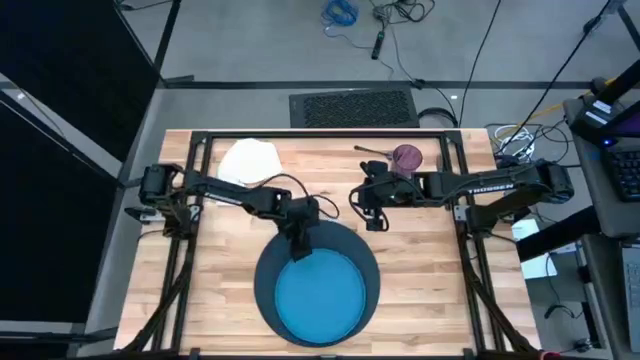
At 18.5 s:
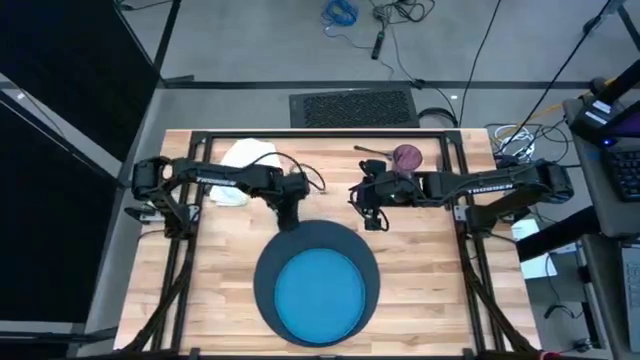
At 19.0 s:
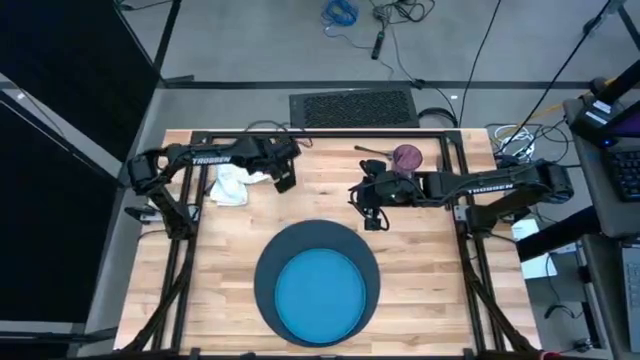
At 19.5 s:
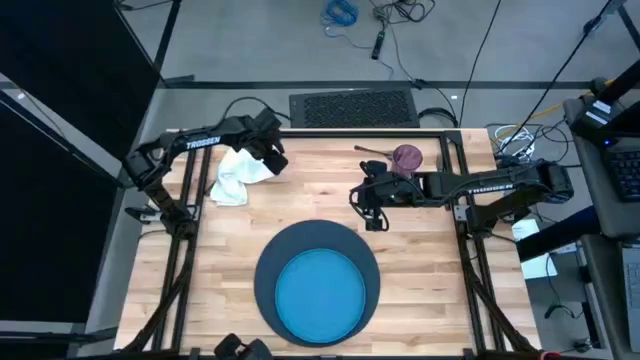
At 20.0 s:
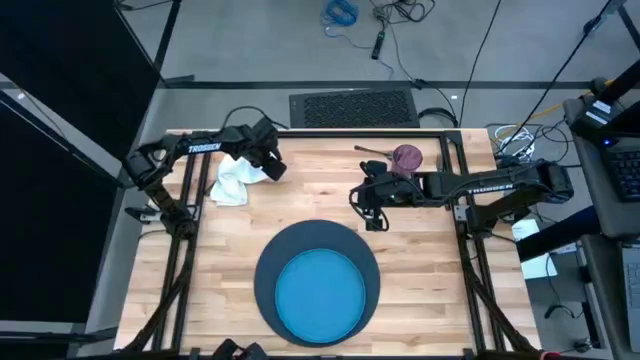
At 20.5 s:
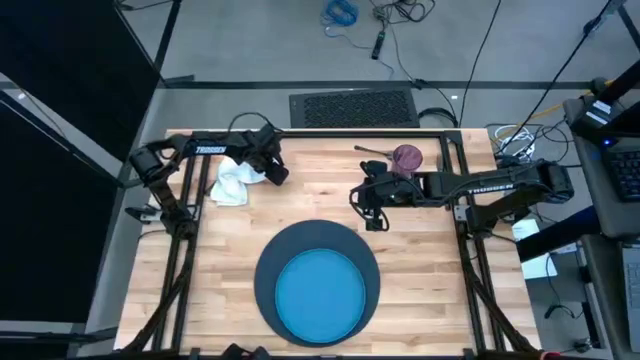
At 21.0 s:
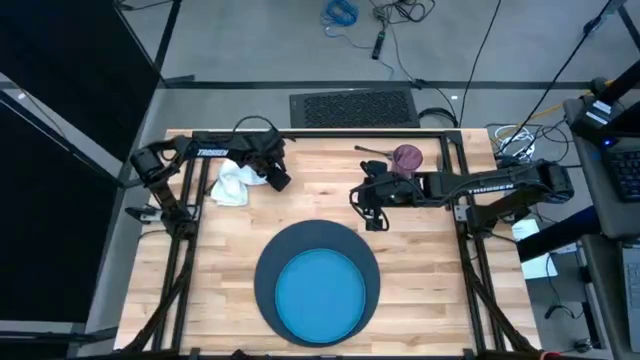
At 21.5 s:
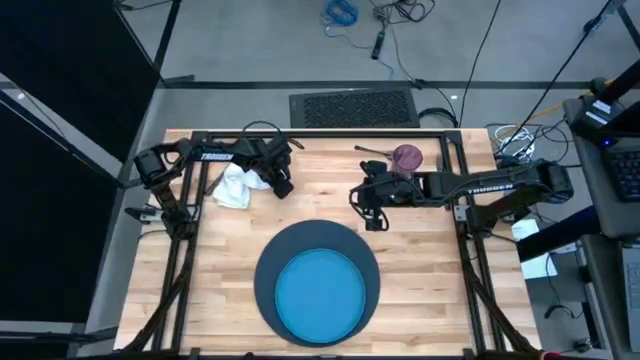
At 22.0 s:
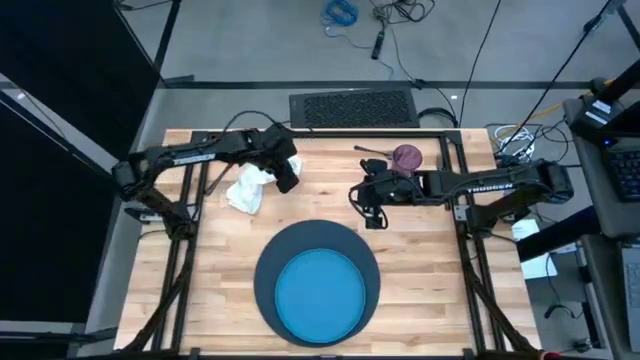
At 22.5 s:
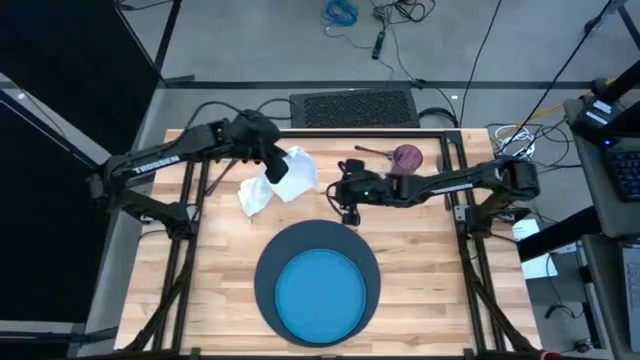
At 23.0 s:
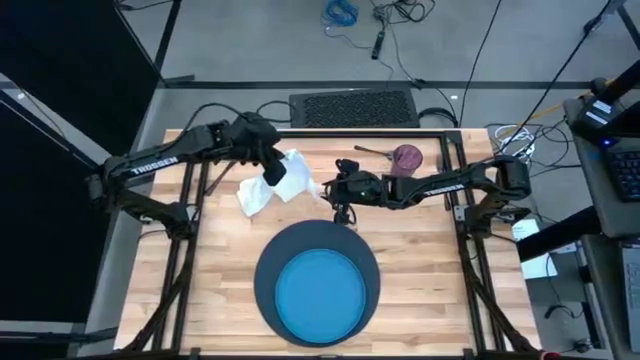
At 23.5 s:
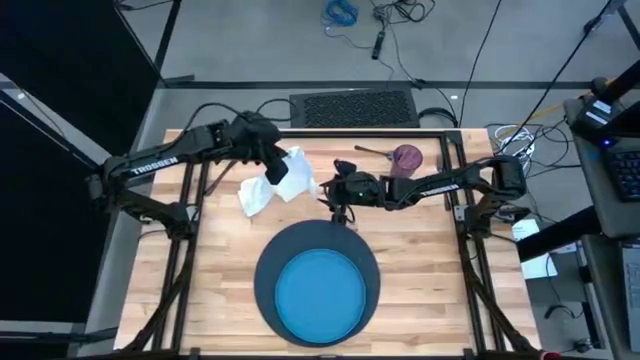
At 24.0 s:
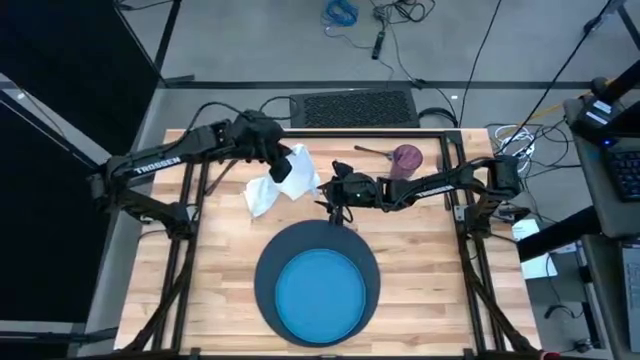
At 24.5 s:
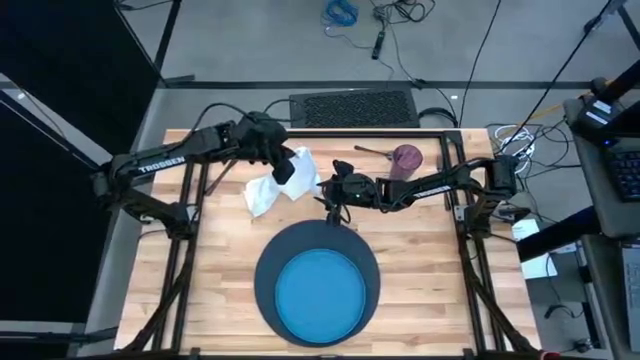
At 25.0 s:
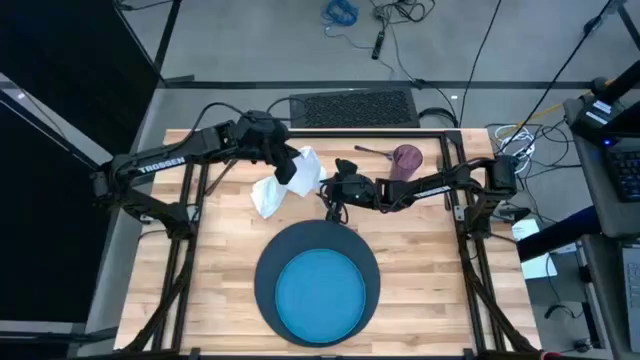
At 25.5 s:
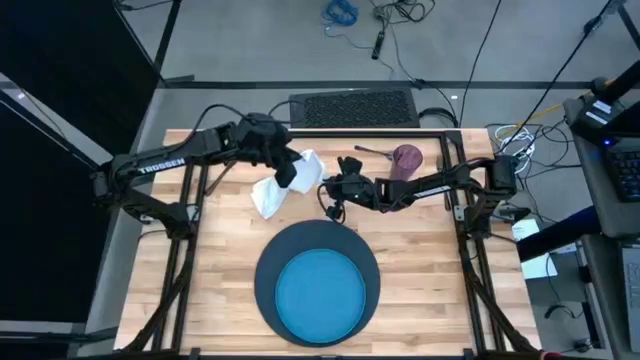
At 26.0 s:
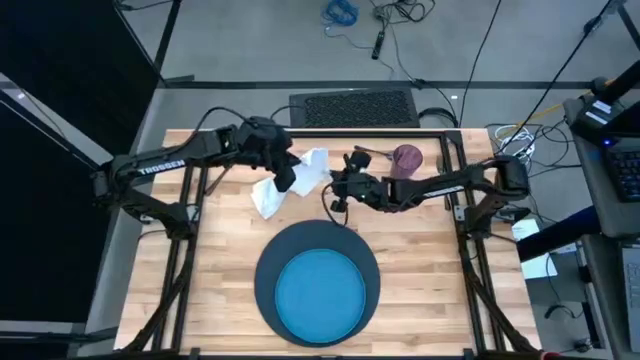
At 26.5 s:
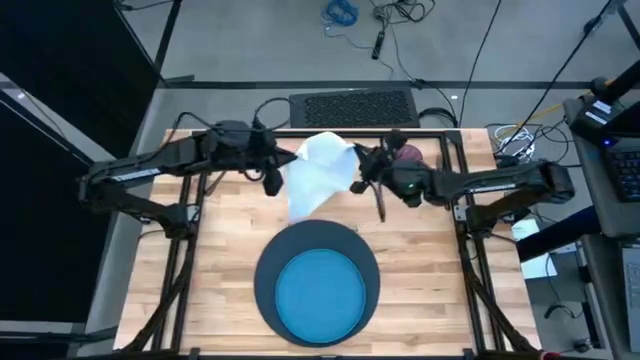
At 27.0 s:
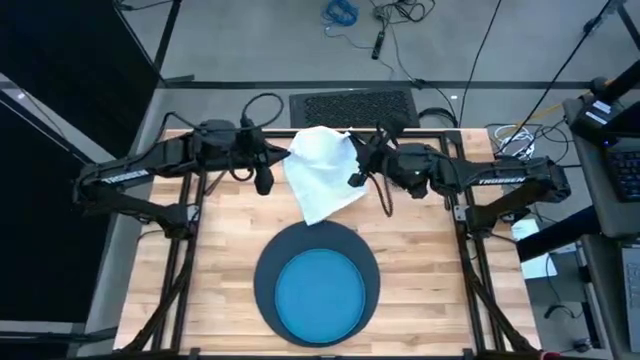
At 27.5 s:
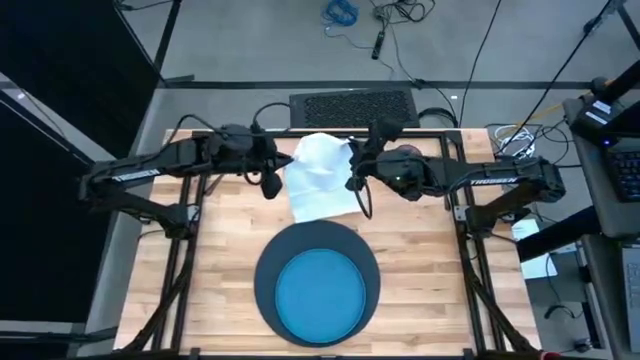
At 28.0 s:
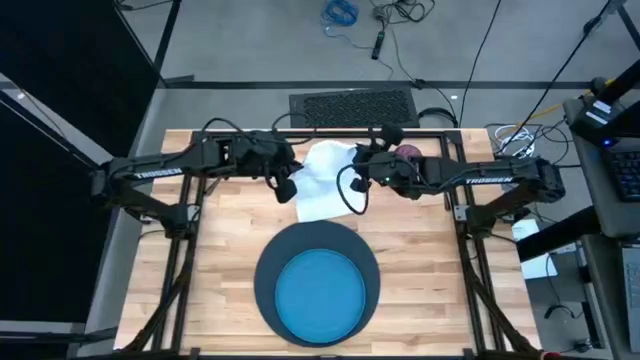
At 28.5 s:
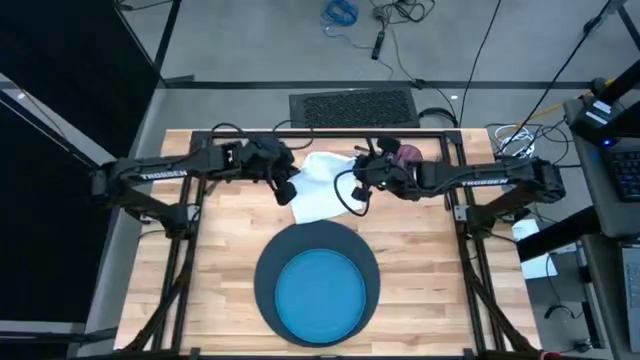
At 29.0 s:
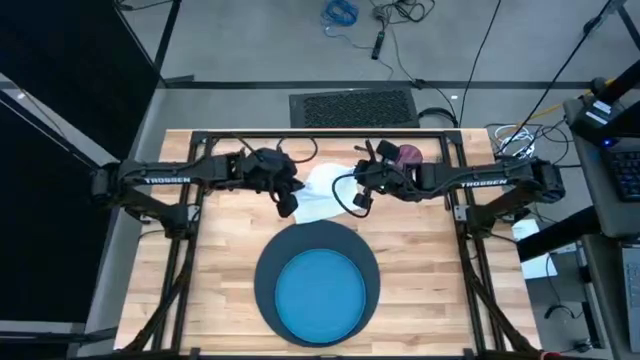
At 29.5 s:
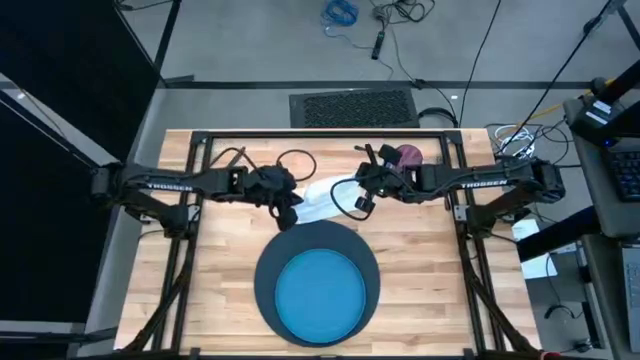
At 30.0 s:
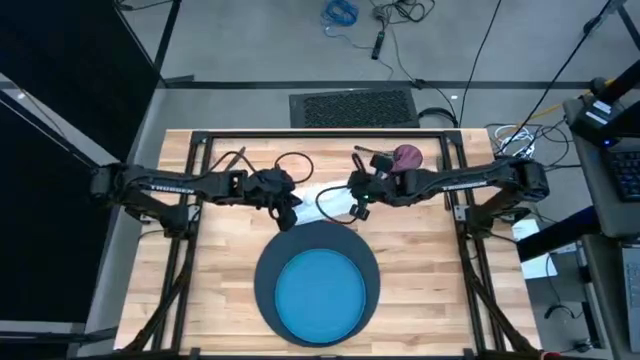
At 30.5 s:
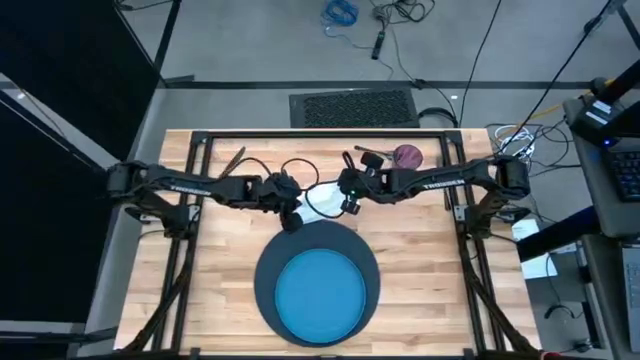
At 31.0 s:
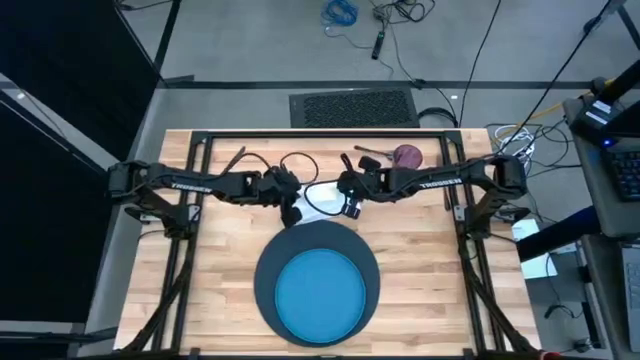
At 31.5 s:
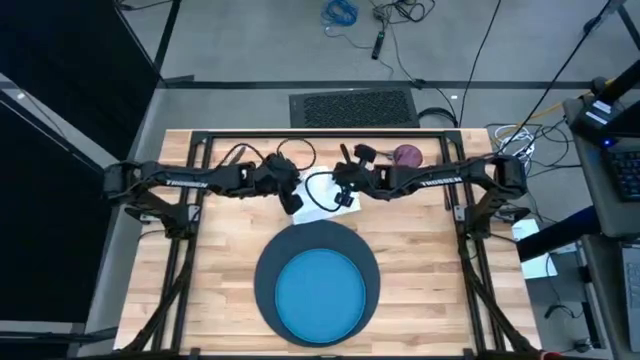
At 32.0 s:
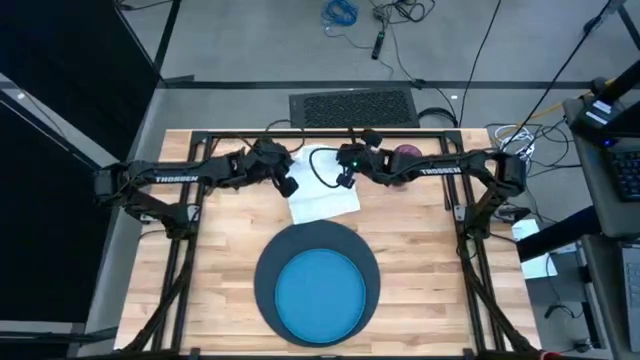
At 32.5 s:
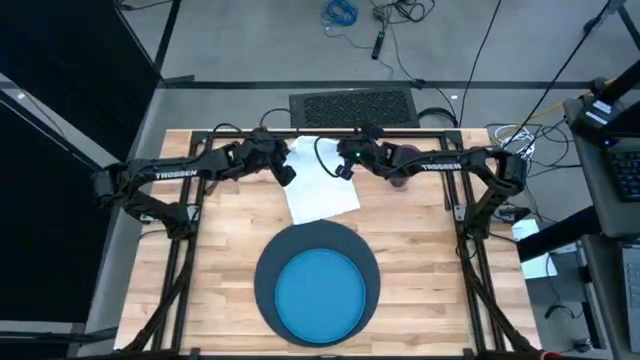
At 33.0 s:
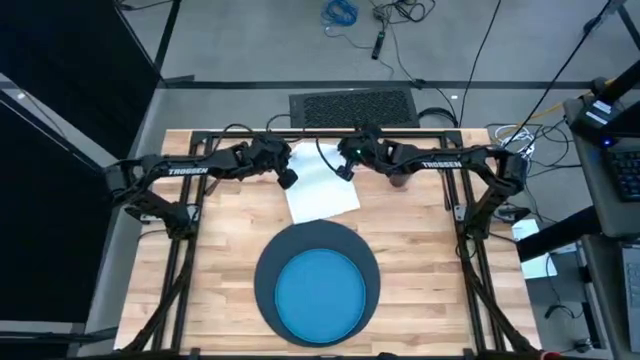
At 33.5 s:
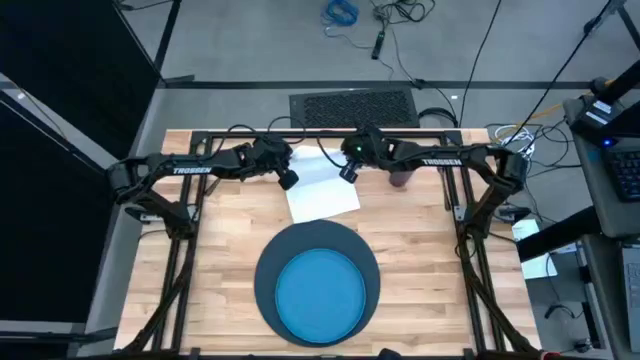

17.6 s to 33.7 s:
Task: Set table place
Fold the white napkin

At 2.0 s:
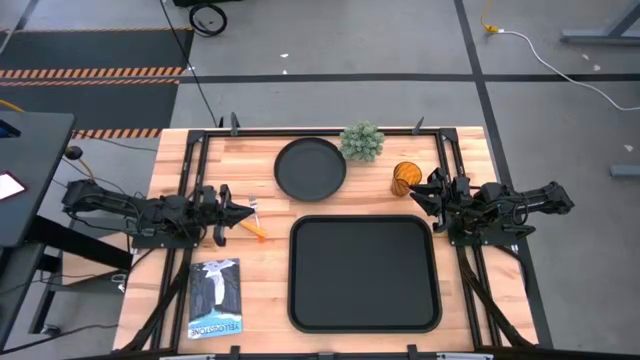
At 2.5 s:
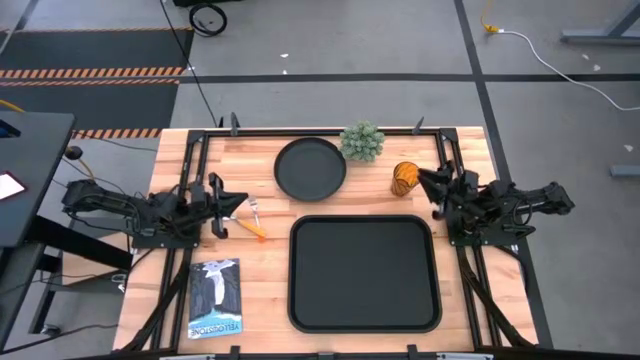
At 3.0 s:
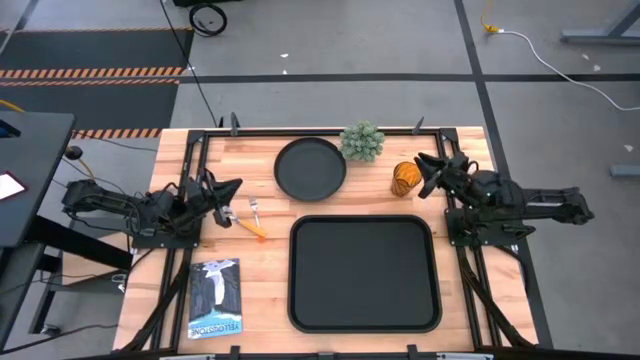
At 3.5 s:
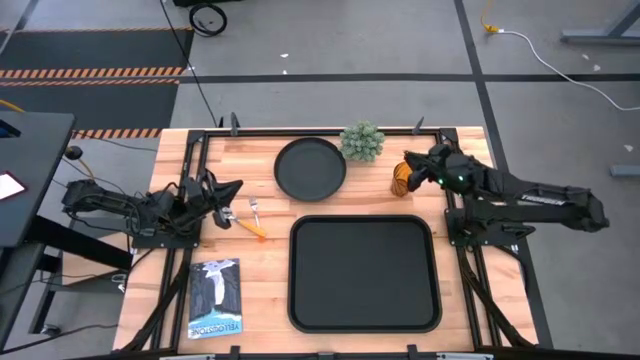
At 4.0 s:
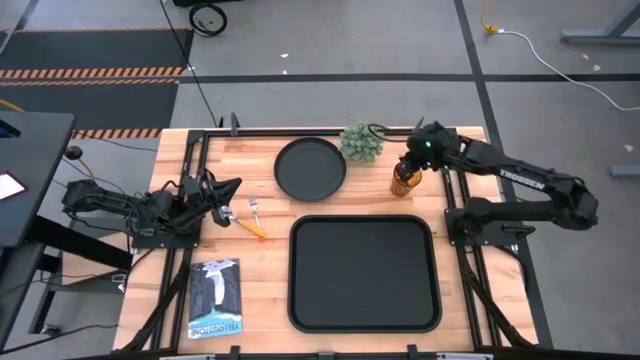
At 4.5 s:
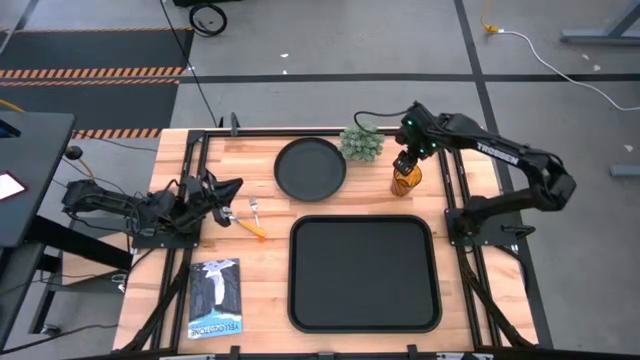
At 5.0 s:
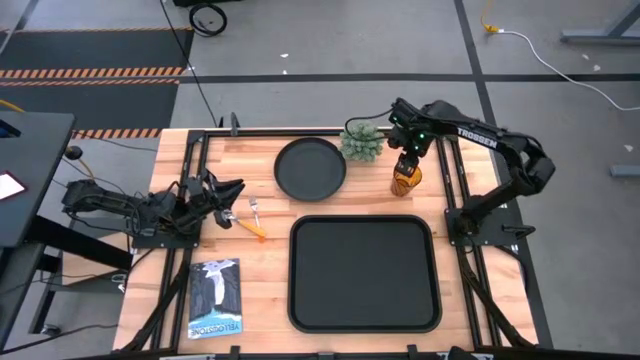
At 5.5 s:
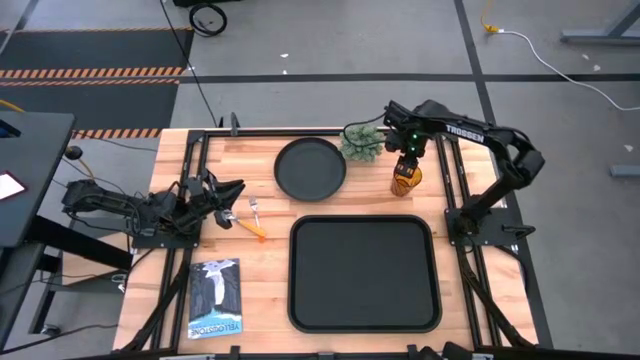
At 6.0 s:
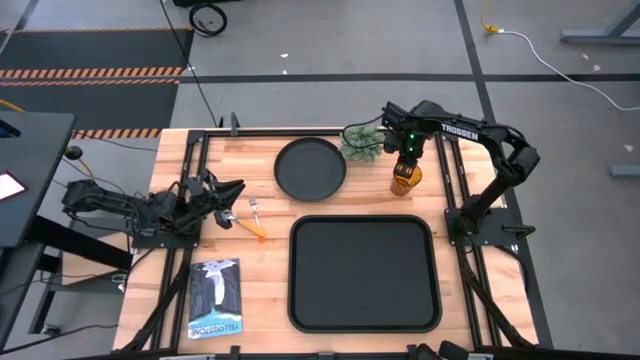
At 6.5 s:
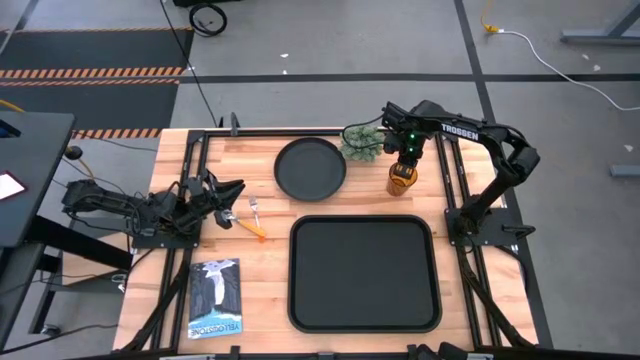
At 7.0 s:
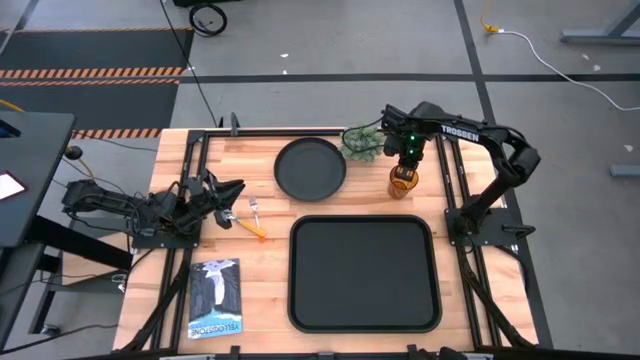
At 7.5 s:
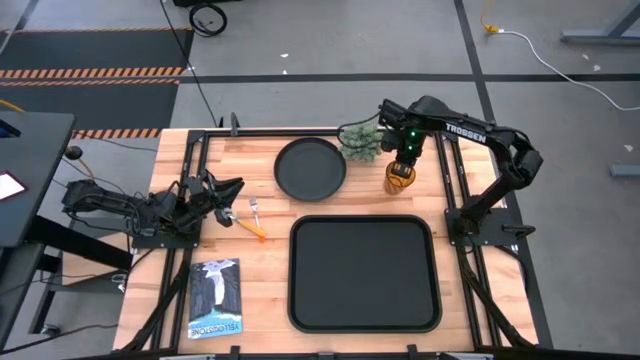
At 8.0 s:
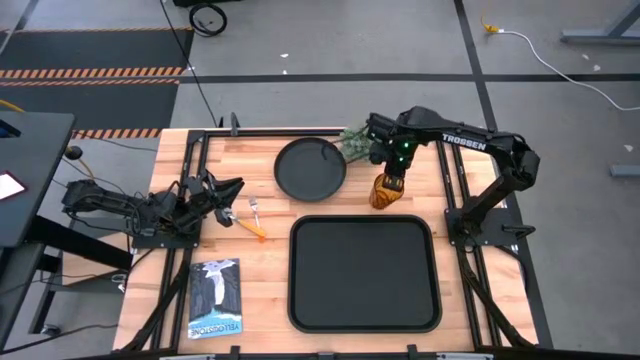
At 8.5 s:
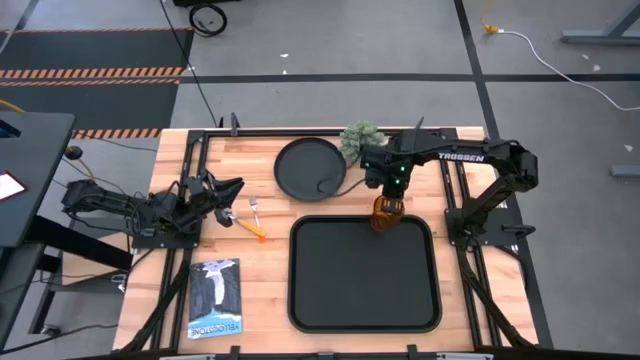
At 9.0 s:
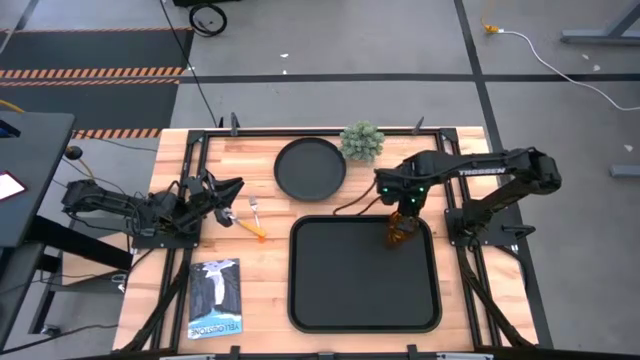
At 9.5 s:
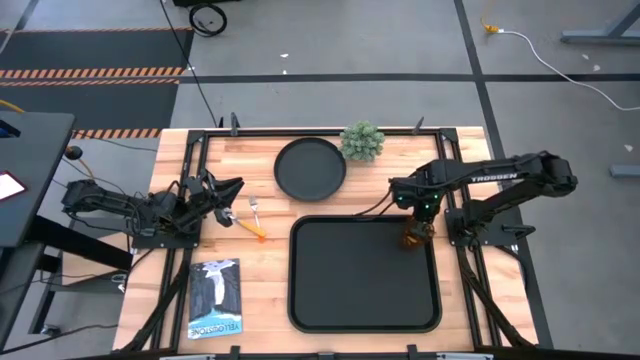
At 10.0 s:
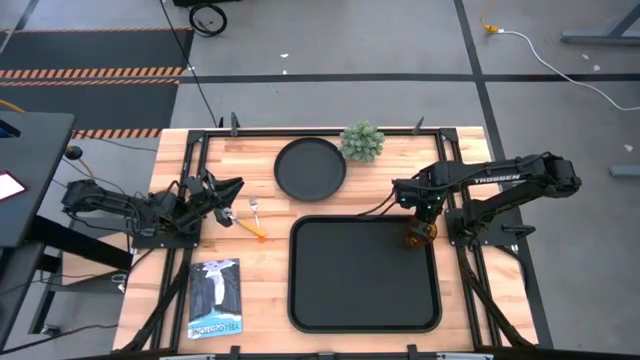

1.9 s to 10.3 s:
Task: Pick and place plate/cup/fork/spoon on tray
Put the brown cup on the top right of the black tray
